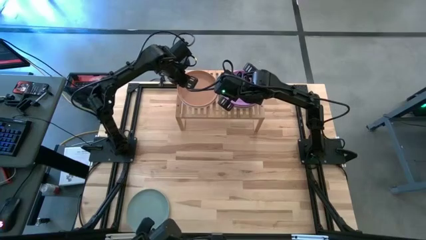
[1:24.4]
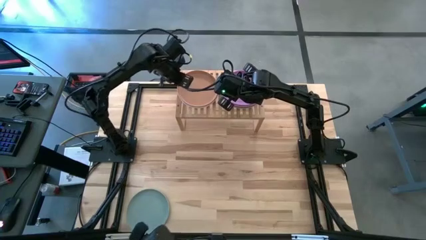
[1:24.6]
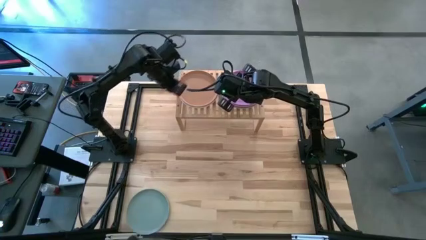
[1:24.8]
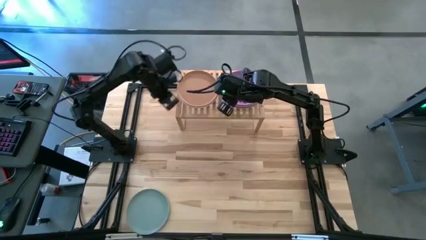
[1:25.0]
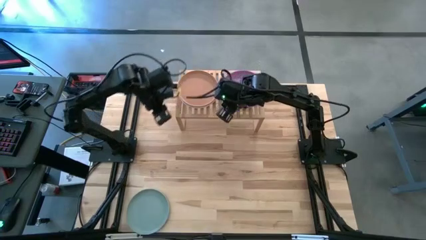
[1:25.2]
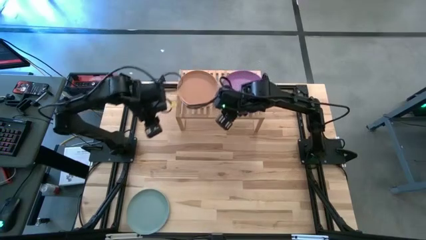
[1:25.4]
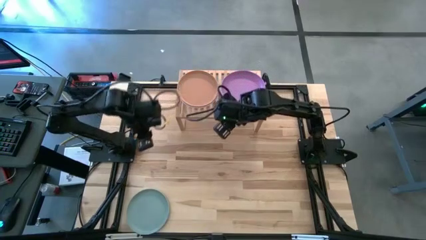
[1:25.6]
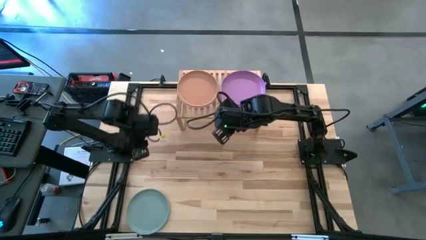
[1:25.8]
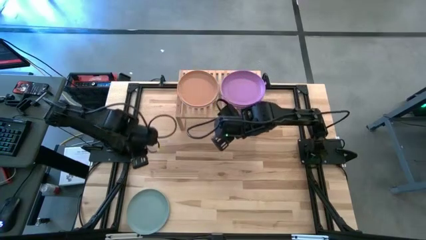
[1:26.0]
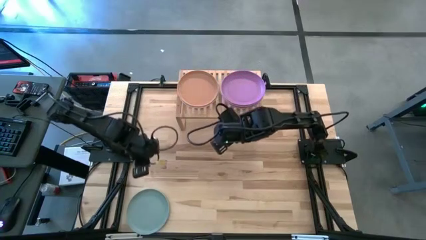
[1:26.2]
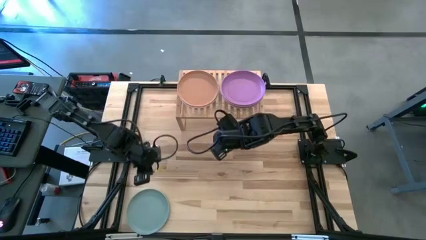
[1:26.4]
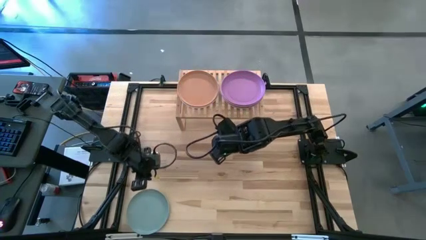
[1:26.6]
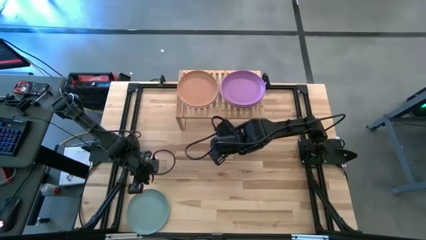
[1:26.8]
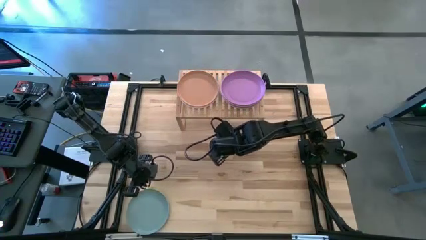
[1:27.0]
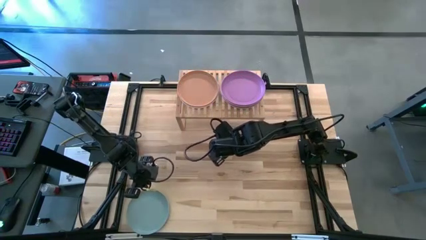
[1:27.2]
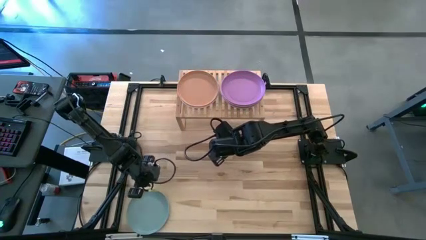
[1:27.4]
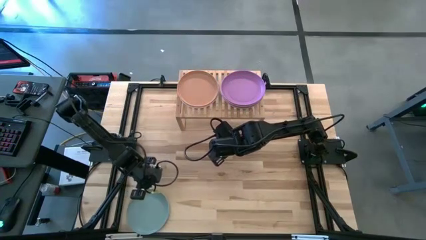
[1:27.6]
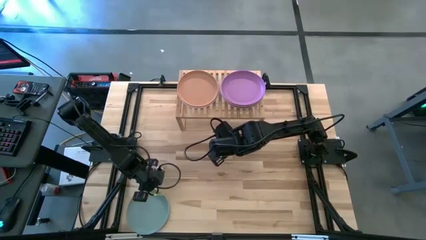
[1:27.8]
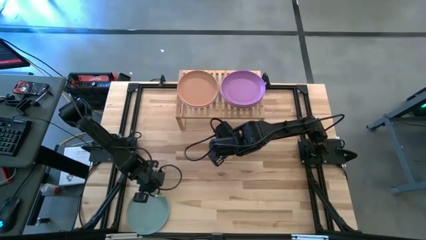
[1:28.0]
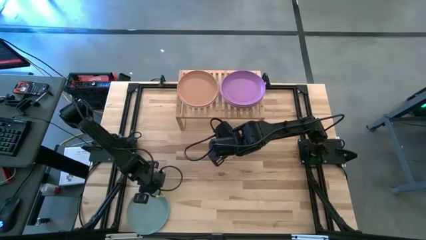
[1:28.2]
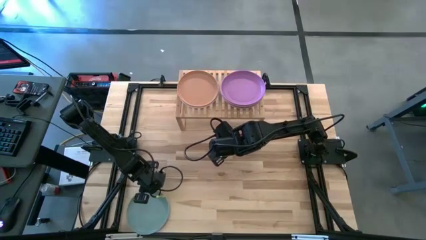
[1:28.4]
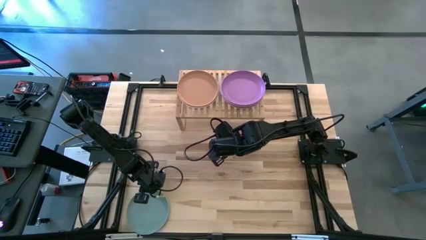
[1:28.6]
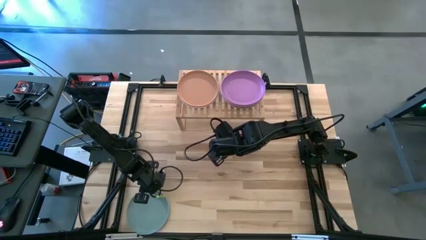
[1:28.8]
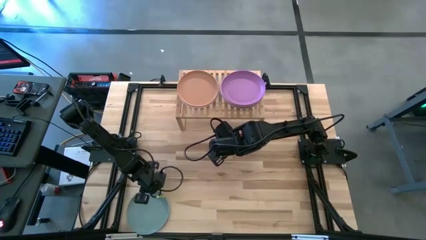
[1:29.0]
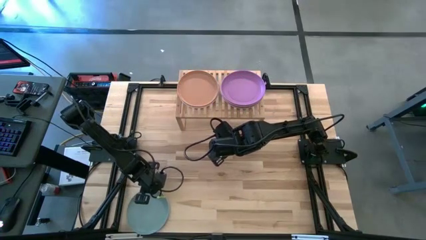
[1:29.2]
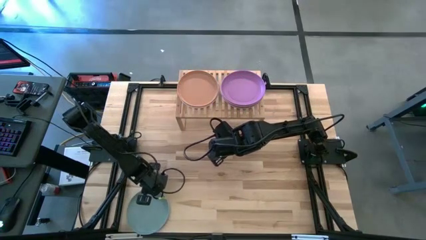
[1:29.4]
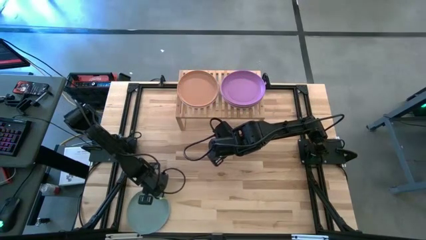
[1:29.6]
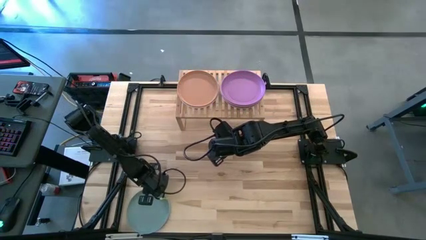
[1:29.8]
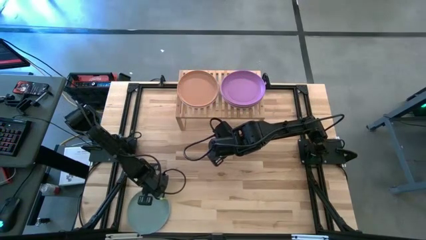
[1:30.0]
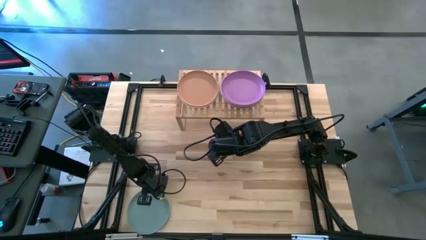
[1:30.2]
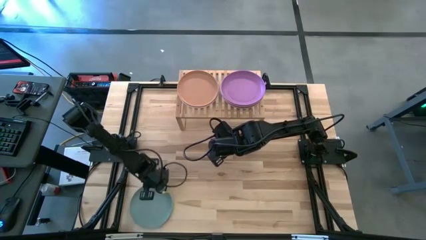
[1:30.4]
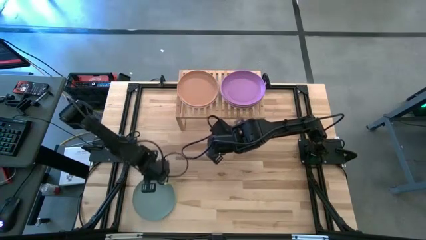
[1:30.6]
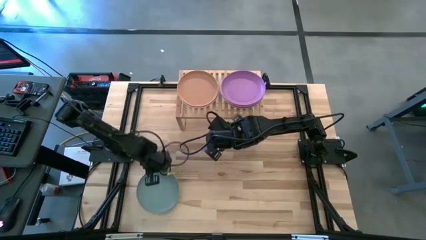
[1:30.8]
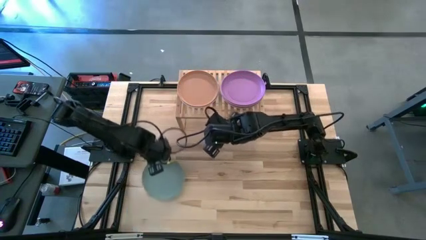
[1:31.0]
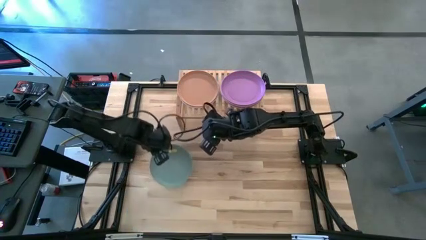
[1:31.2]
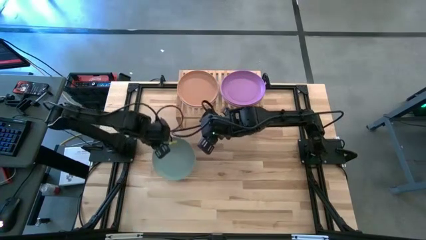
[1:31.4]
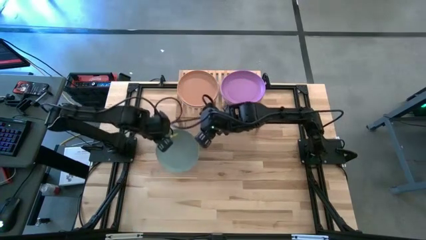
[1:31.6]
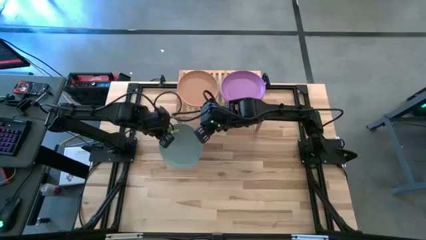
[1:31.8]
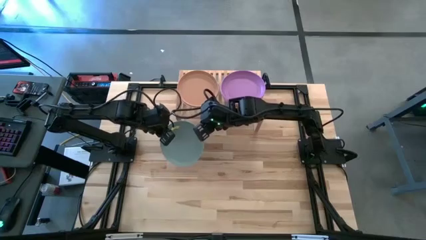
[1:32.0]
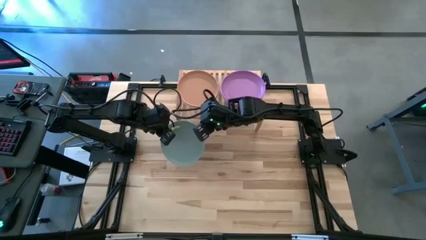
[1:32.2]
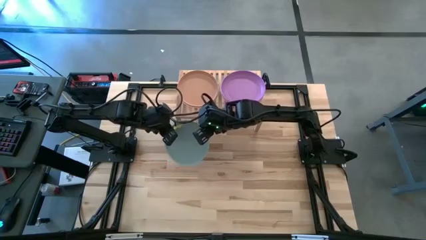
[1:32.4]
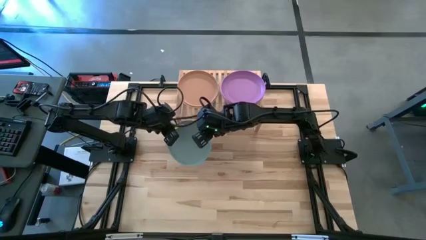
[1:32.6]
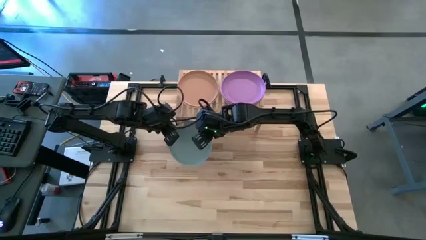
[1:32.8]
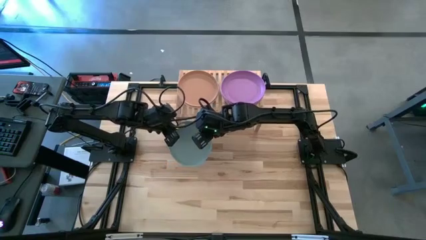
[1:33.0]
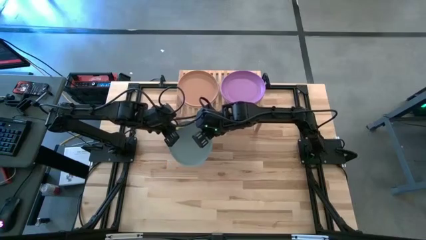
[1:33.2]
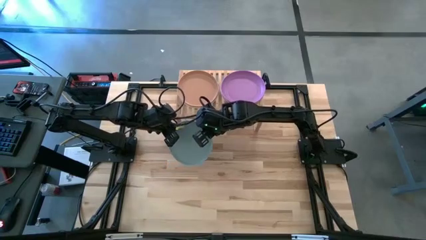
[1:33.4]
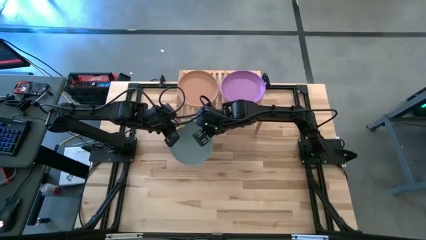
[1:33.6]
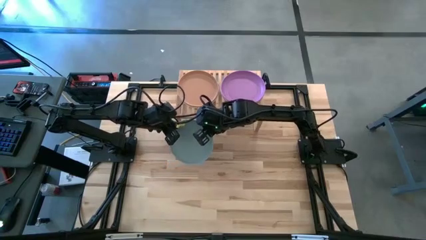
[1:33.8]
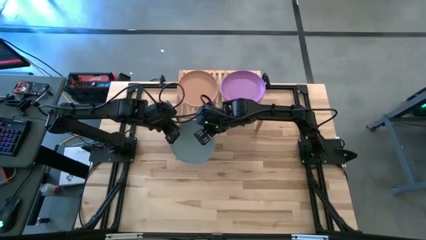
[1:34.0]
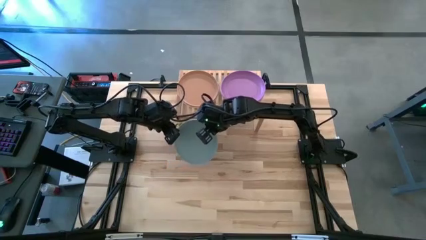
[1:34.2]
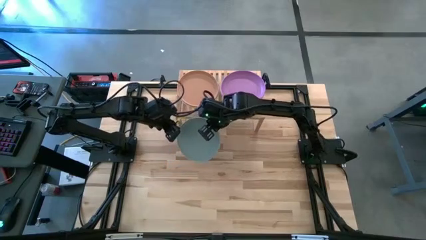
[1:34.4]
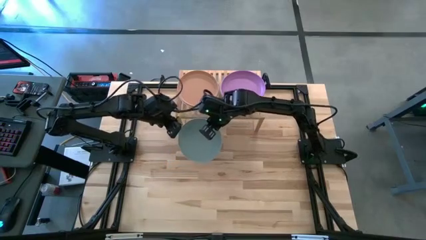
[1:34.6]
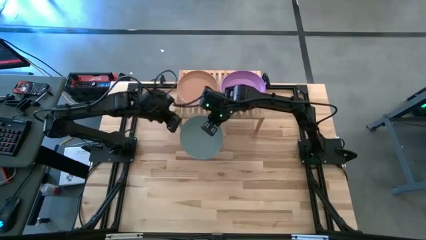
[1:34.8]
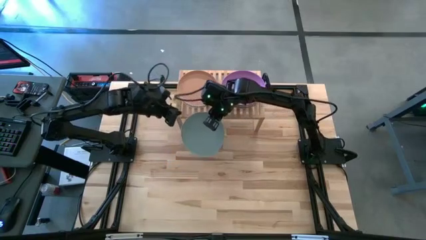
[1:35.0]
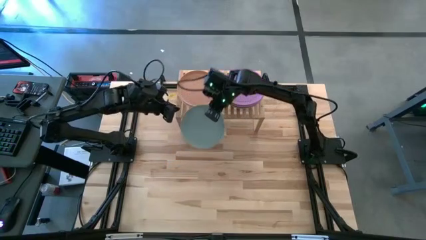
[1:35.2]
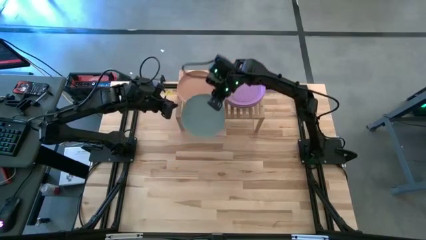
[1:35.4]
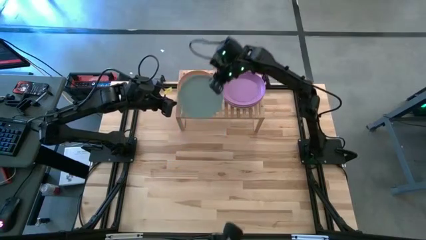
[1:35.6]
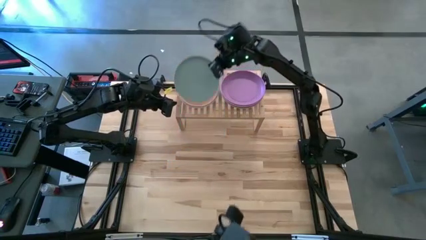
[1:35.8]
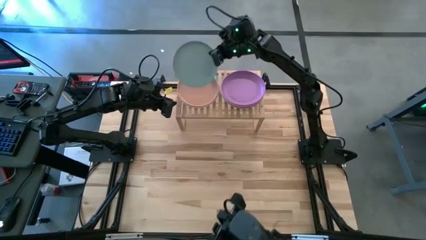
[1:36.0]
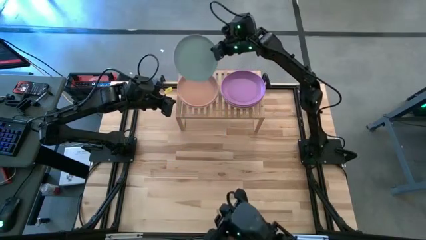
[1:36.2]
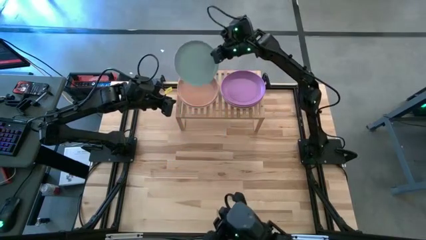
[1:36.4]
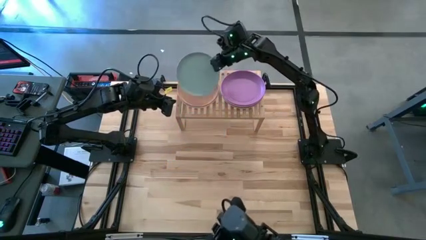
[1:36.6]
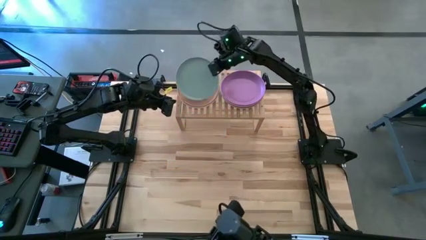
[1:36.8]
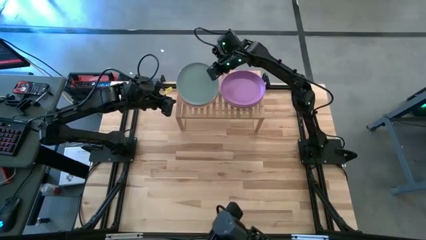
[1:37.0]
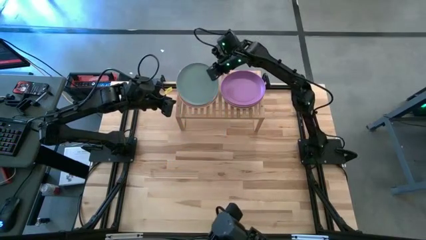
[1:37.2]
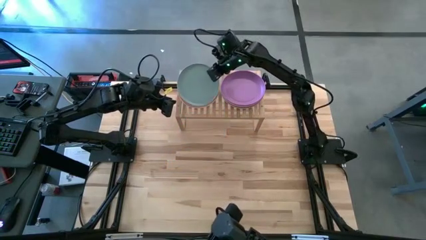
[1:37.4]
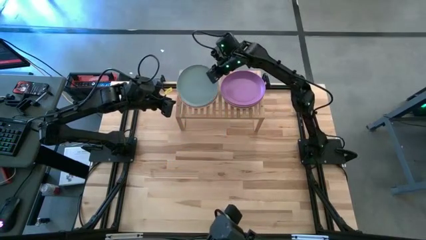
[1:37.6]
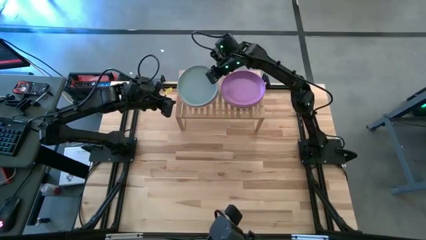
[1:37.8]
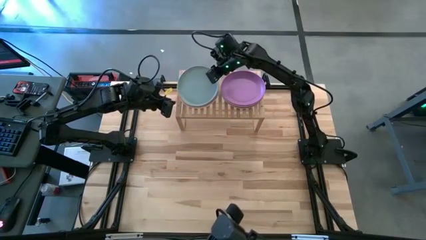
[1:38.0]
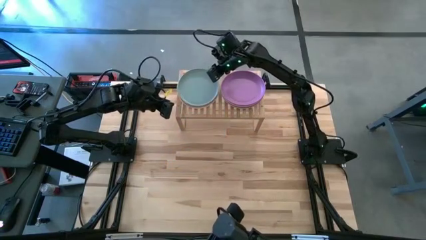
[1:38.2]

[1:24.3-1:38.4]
Task: Place and stack plates onto a shelf
Stack the blue plate on top of the orange plate on the shelf

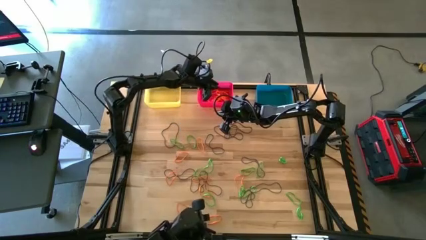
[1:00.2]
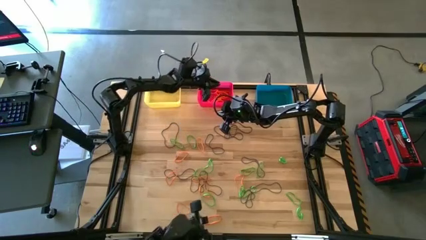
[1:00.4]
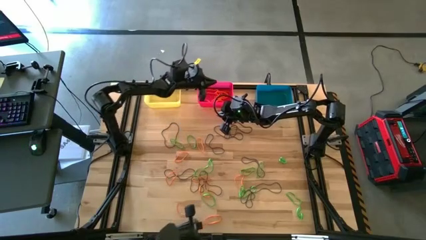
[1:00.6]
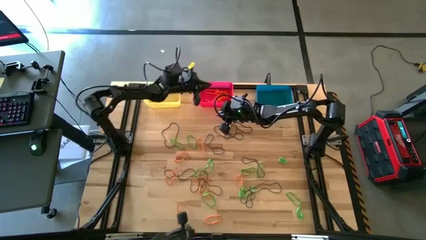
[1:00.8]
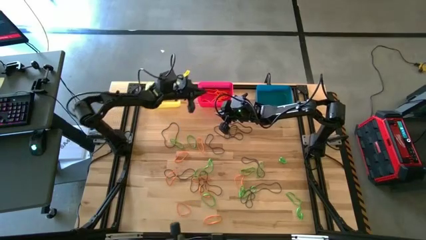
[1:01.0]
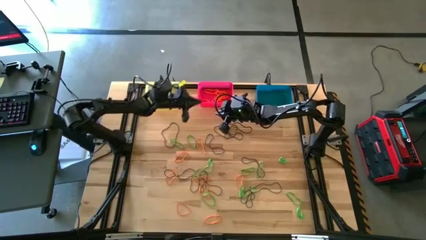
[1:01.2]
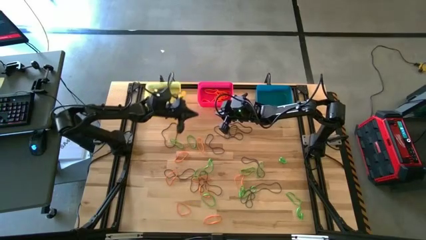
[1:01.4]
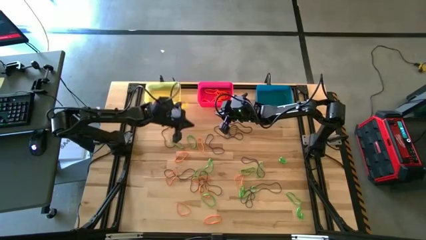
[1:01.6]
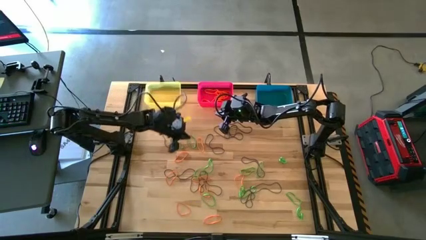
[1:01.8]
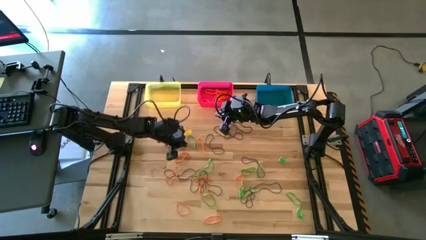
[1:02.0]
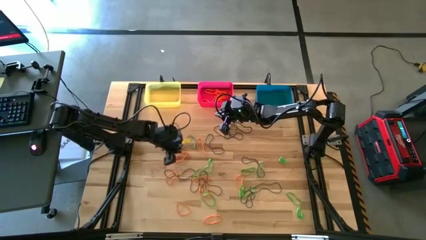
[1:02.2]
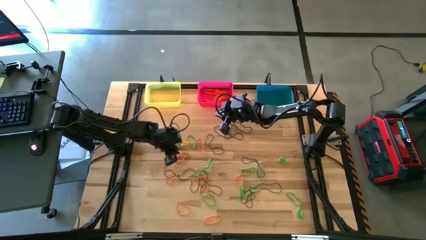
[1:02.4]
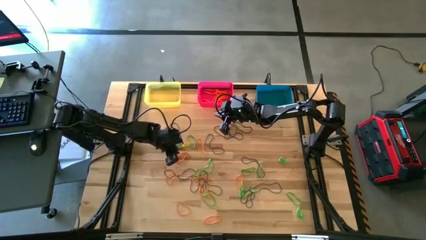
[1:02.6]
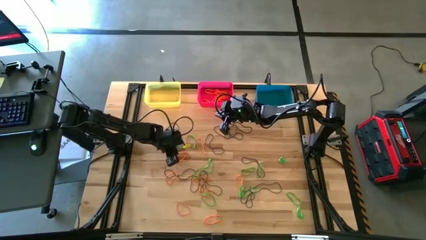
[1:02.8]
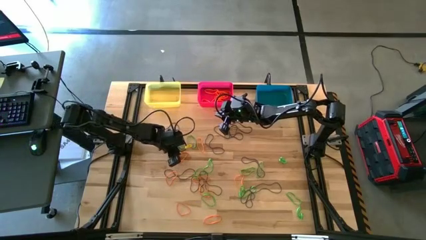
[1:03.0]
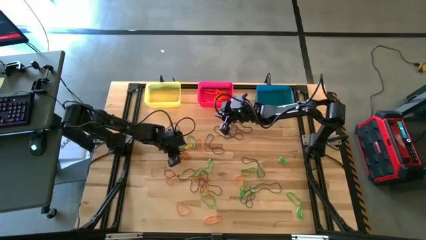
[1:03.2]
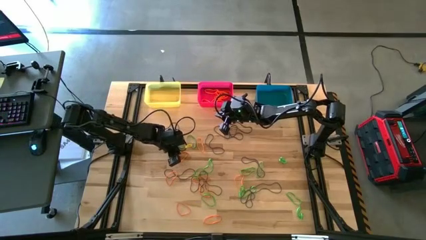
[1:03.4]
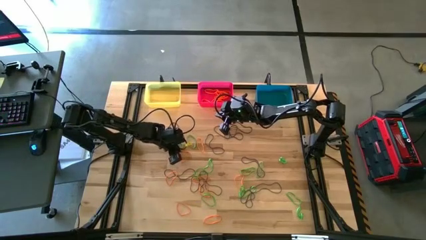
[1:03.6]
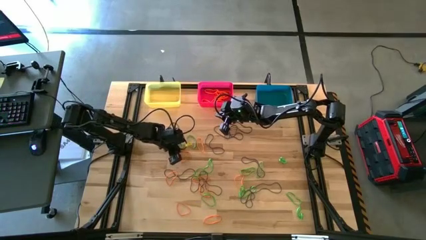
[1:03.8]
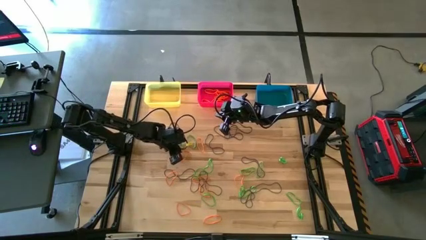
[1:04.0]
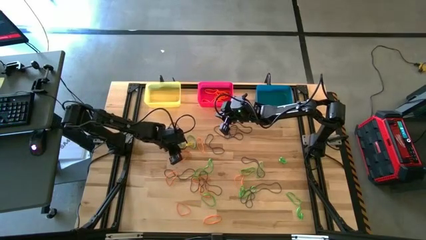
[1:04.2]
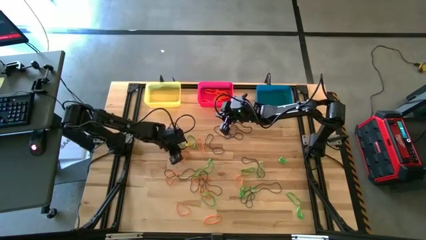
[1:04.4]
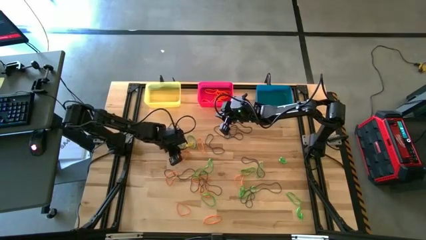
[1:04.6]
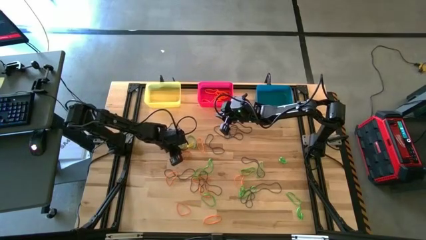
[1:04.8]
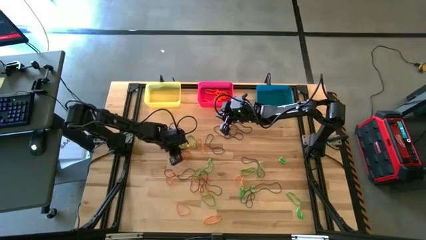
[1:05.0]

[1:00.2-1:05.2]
Task: Sort rubber bands into baskets
Put the orange rubber band into the pink bin
